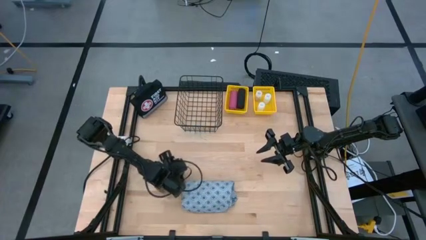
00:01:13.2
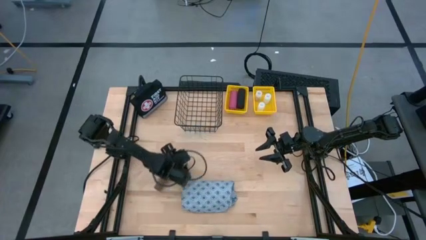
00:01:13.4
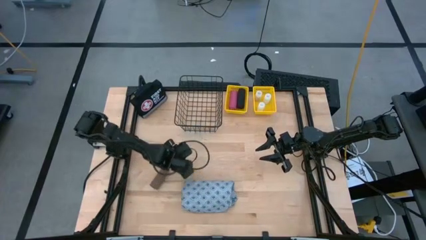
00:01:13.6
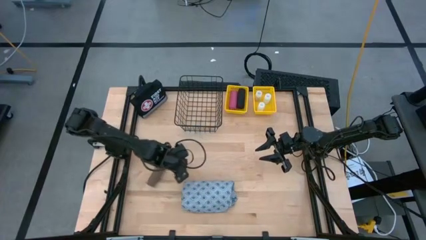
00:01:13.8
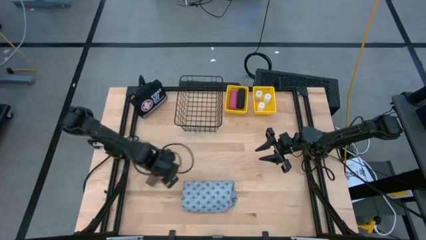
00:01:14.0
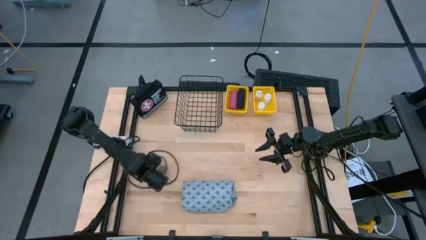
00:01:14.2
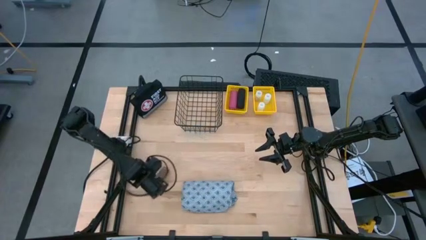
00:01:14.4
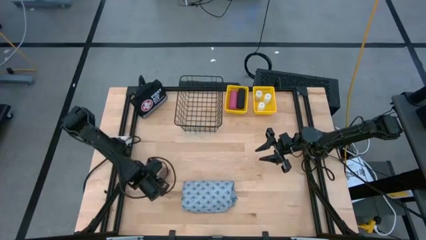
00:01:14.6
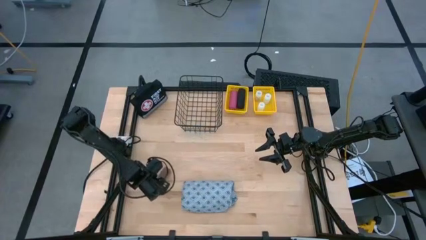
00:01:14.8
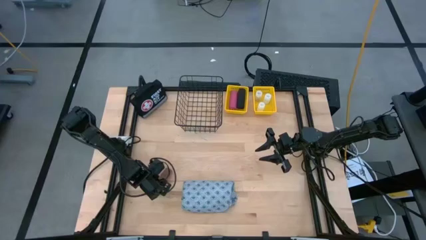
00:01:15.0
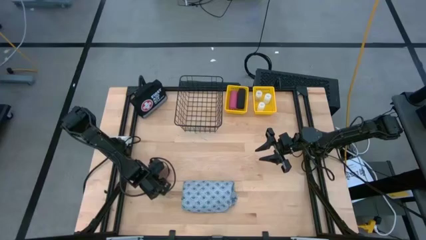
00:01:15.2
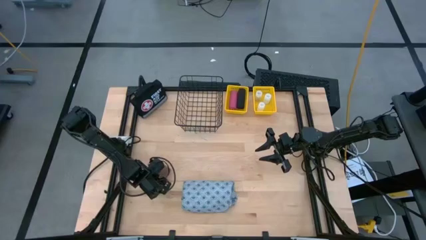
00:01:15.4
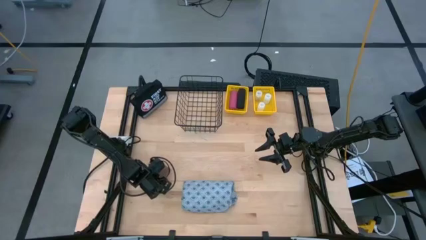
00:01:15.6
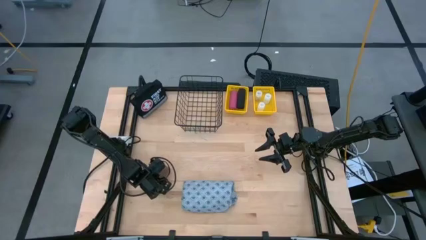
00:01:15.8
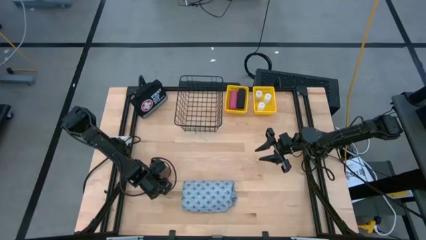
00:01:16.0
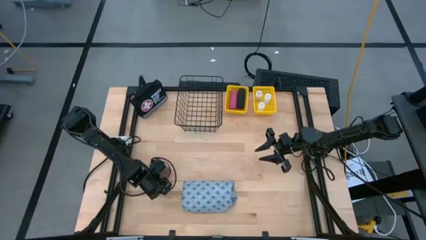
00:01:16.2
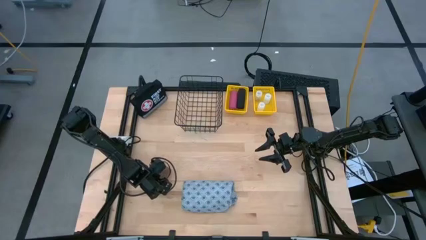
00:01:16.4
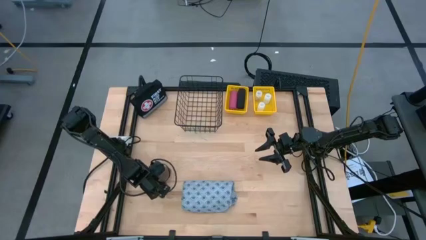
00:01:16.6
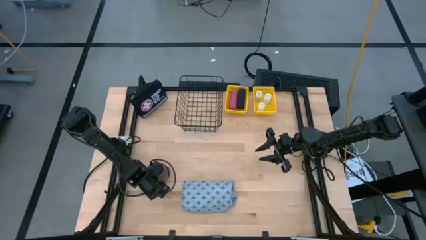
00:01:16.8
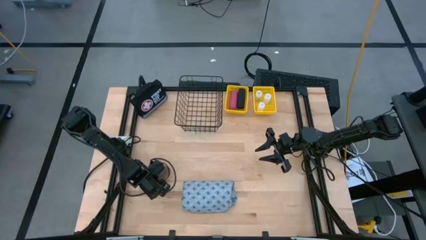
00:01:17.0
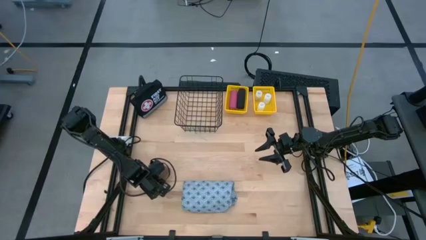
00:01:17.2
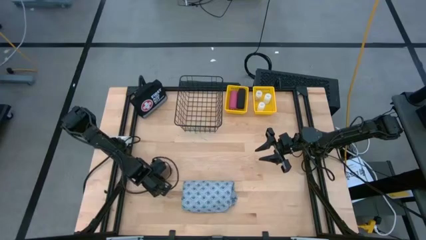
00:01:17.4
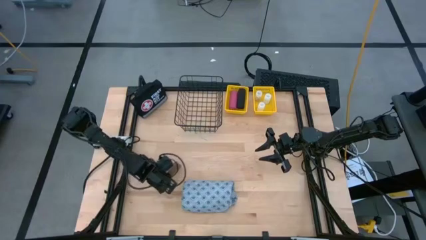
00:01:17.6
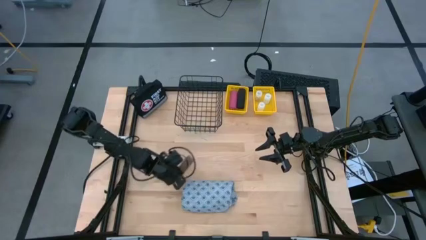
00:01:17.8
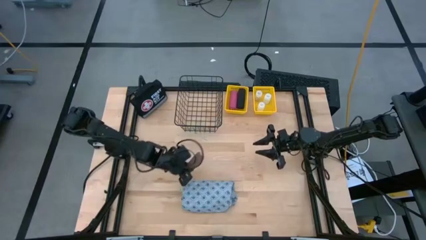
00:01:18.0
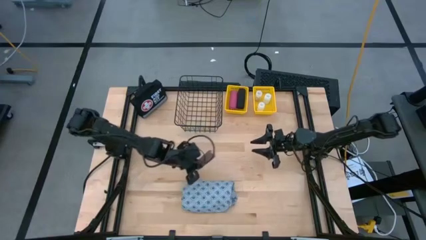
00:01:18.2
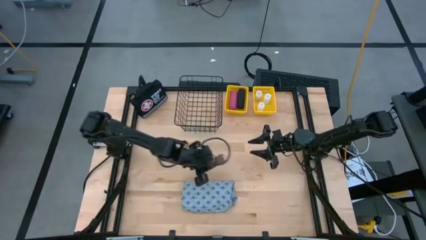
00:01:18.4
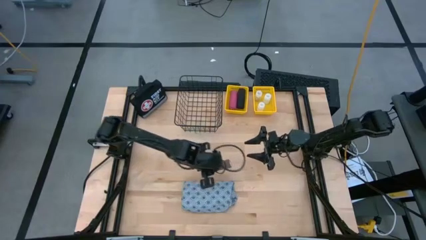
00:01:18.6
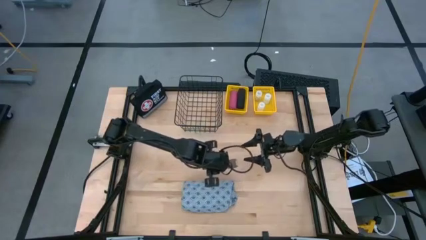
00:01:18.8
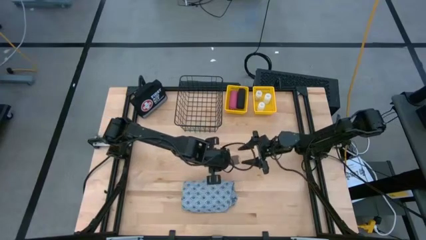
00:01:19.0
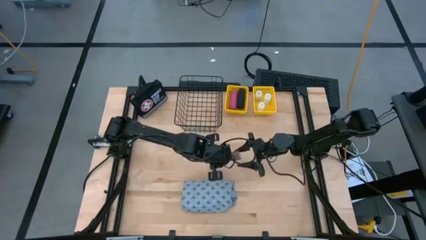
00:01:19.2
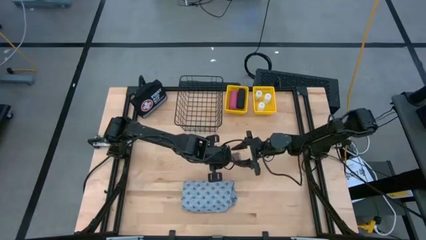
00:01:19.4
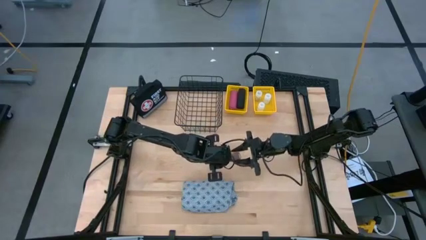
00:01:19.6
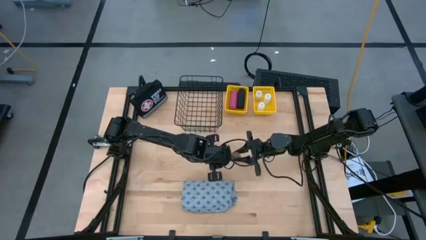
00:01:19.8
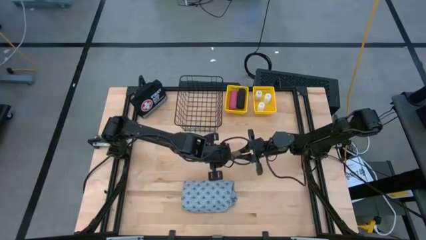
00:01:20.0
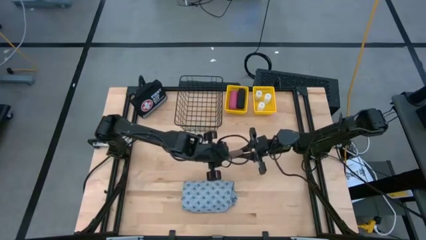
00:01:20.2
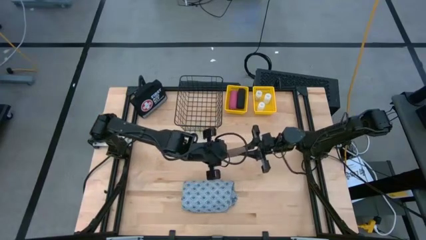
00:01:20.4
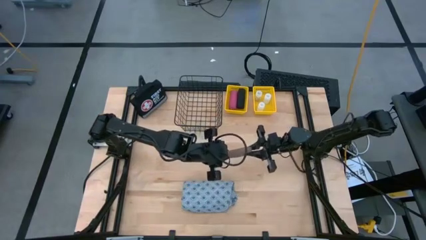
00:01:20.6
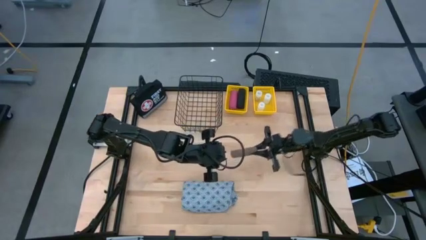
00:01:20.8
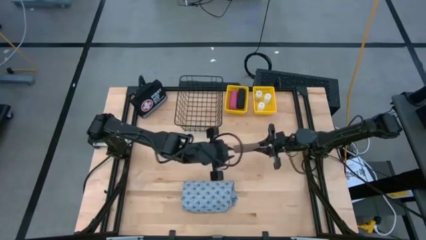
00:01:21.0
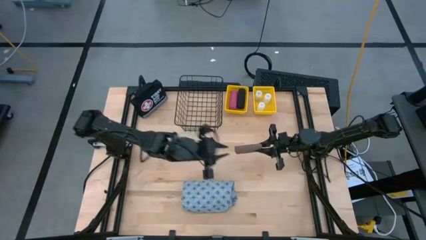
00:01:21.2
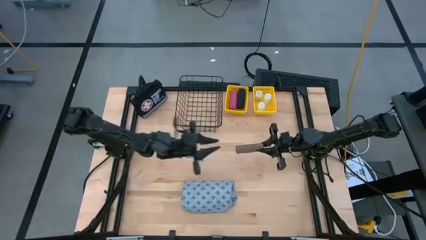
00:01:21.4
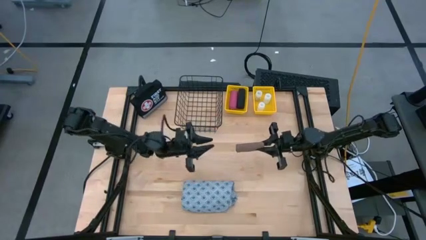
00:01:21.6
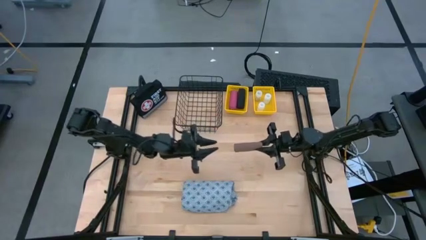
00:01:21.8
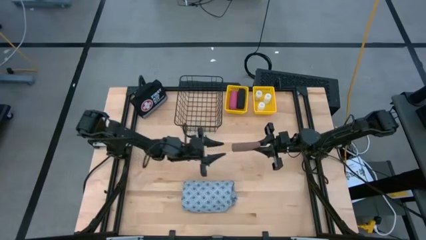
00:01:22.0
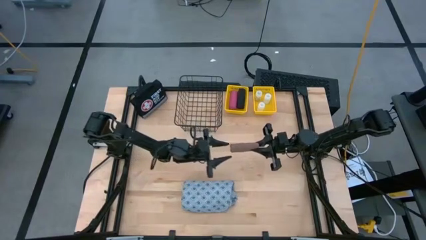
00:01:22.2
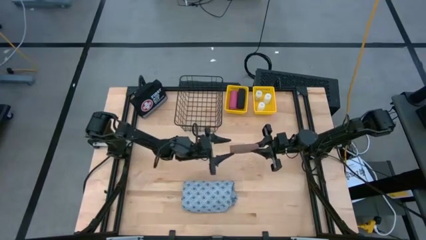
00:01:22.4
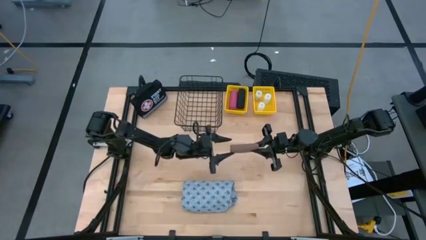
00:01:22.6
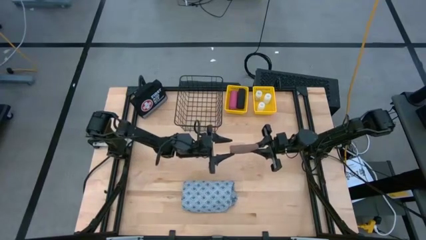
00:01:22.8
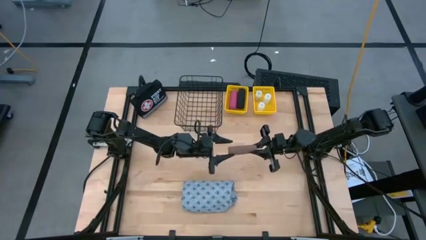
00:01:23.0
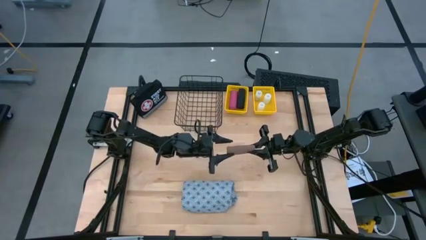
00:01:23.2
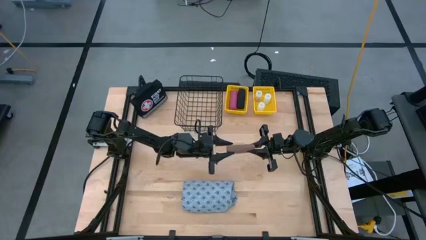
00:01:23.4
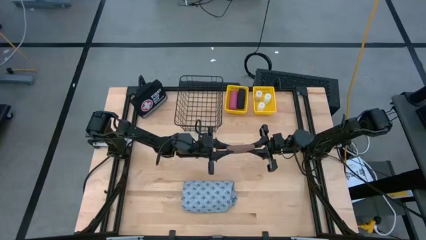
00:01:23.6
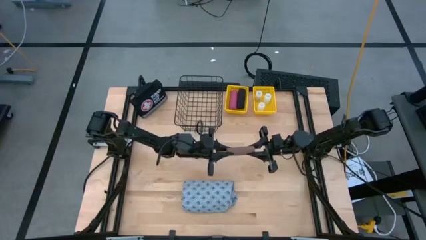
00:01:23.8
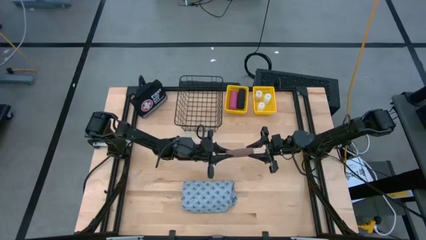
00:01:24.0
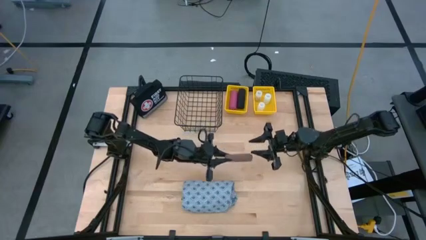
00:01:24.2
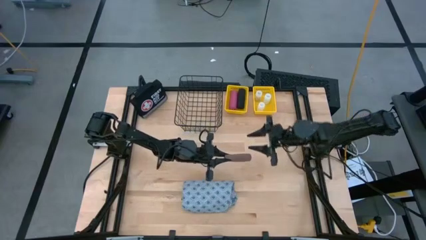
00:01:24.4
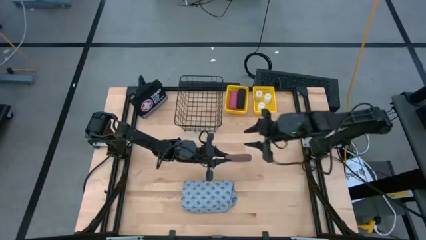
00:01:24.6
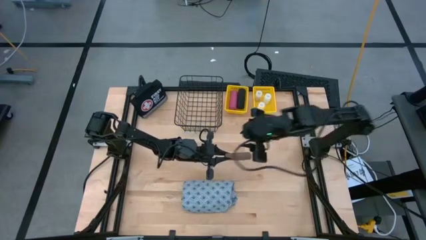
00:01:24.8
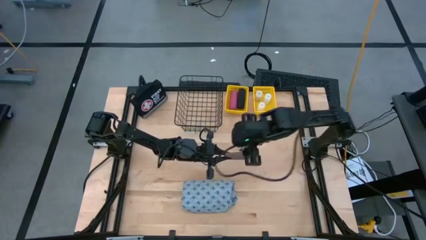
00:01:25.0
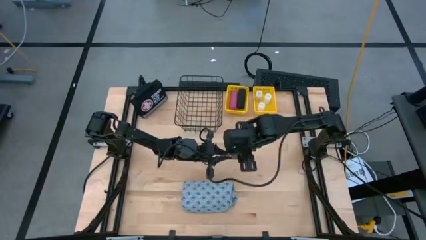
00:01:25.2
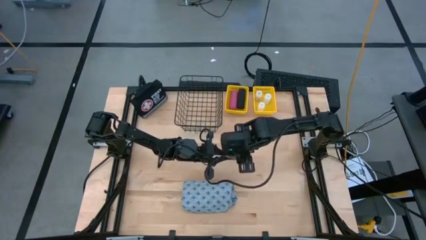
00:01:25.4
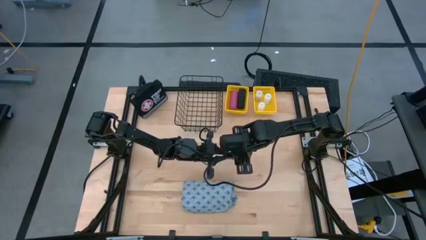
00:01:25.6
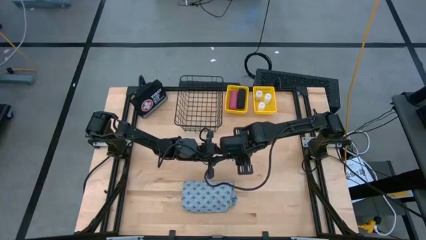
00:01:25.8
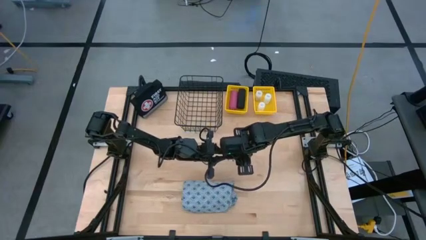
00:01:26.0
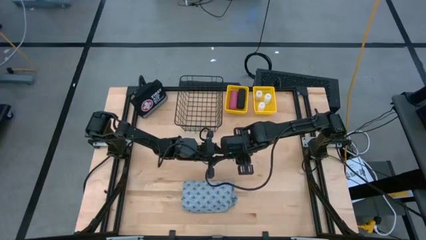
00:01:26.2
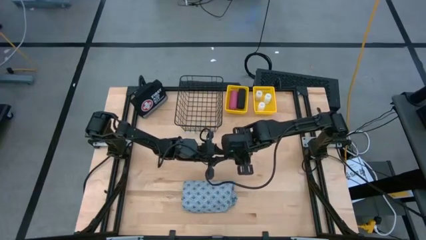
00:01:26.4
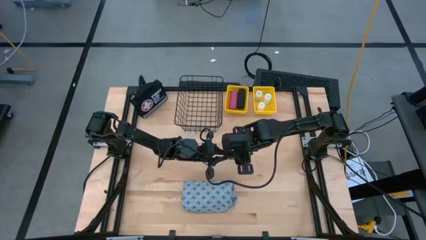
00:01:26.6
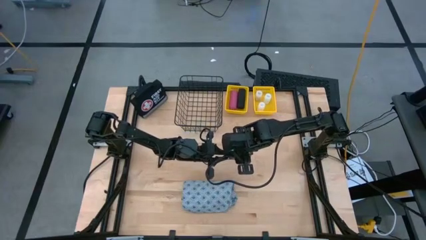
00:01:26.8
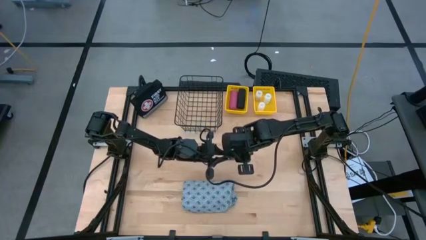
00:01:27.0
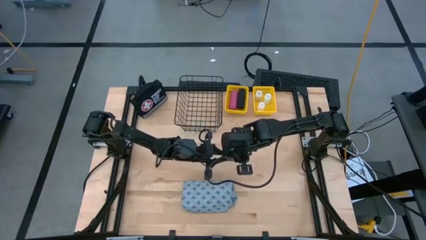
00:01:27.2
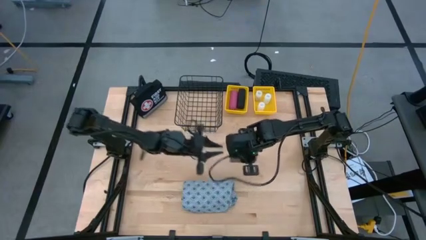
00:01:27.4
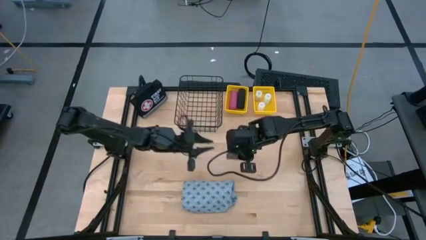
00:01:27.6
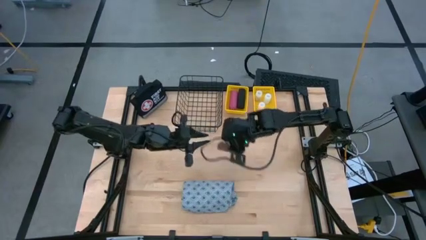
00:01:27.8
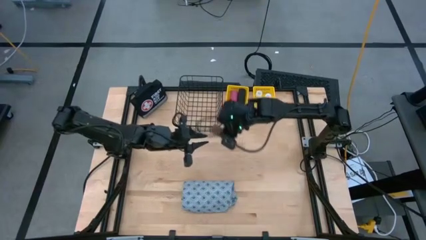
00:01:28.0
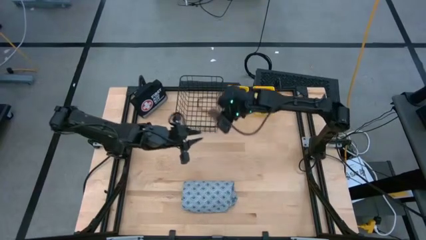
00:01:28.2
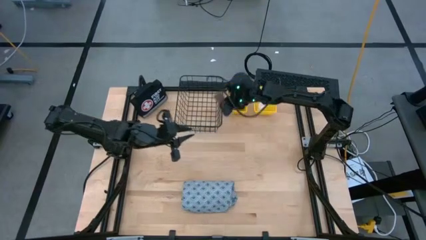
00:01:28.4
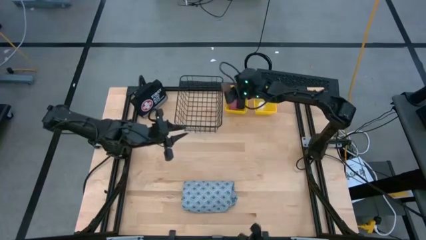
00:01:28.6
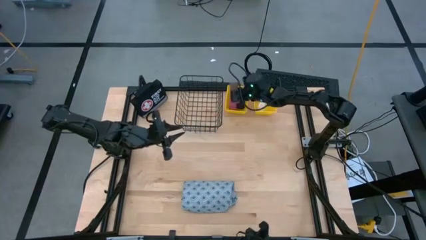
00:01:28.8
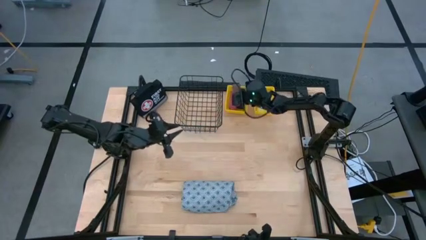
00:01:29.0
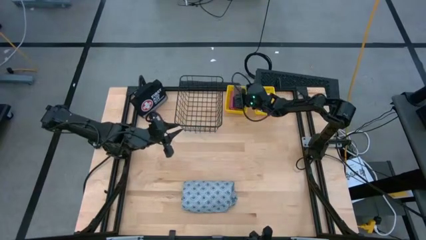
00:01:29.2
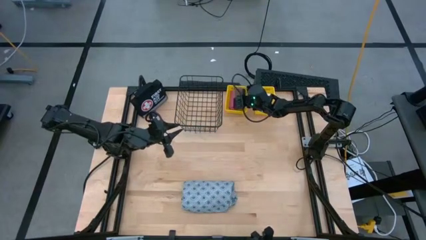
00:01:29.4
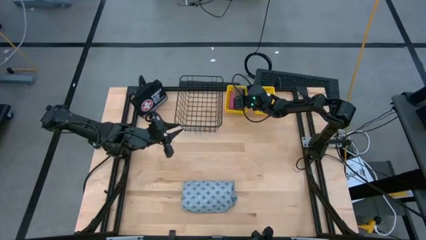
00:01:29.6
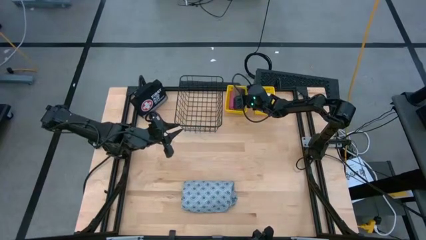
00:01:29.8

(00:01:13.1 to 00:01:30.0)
Task: Pick & Place Medicine items
Put the brown bandage into the left yellow basket
